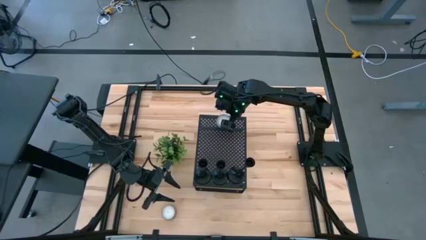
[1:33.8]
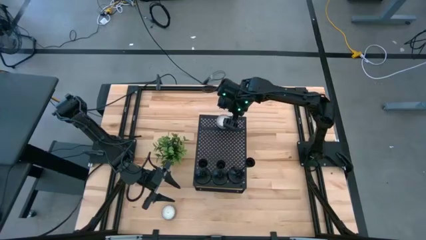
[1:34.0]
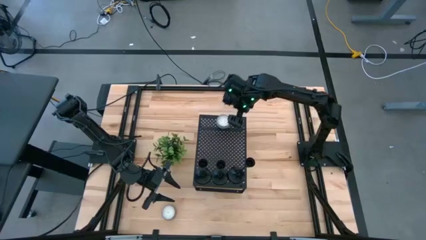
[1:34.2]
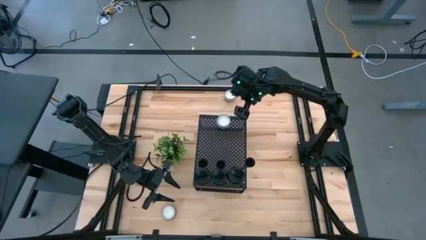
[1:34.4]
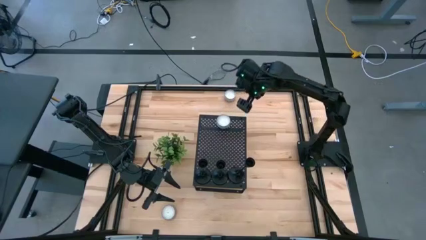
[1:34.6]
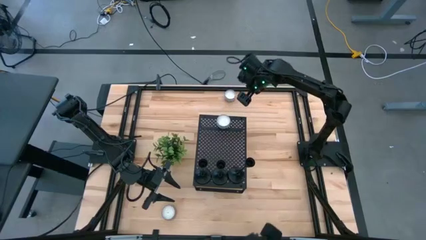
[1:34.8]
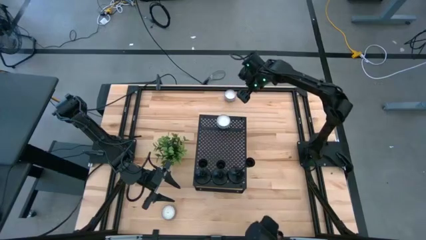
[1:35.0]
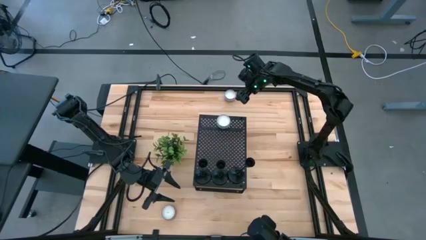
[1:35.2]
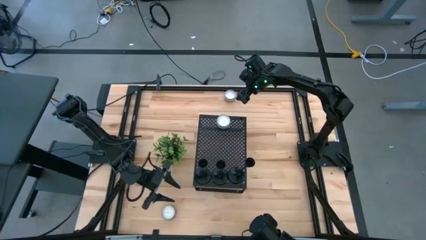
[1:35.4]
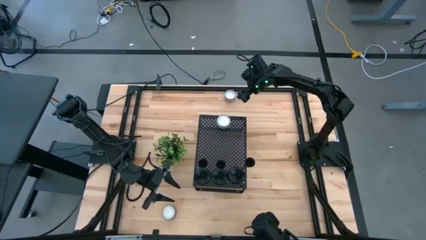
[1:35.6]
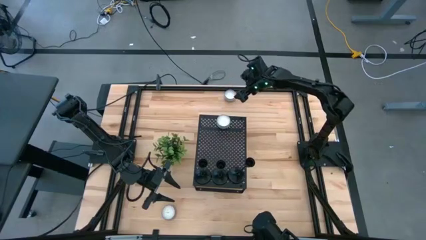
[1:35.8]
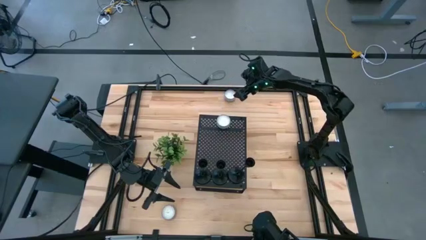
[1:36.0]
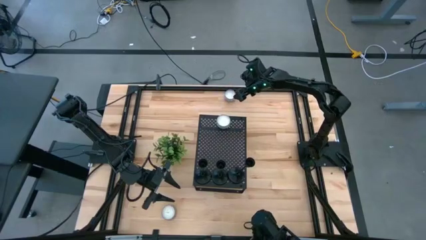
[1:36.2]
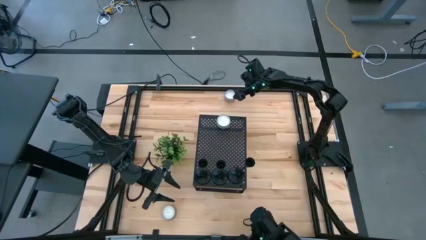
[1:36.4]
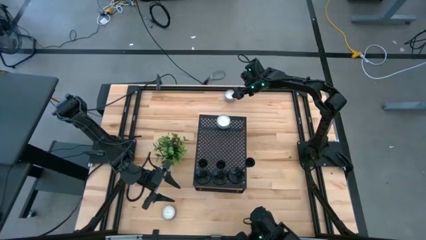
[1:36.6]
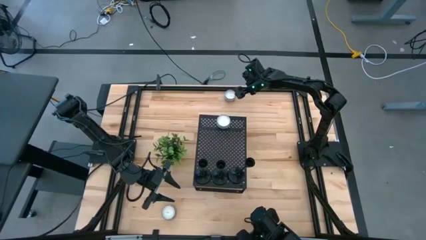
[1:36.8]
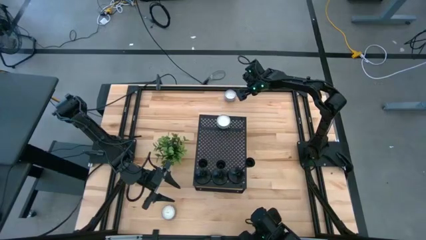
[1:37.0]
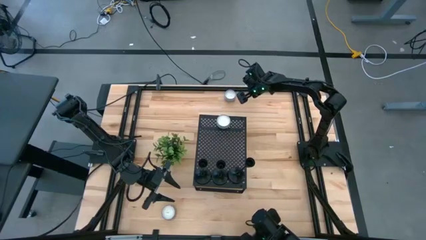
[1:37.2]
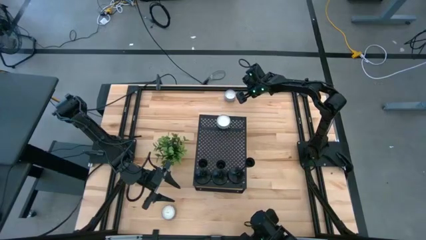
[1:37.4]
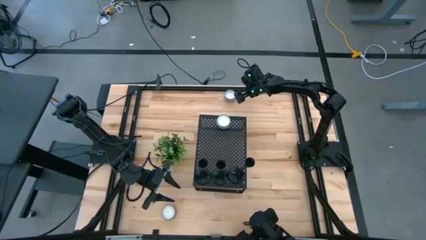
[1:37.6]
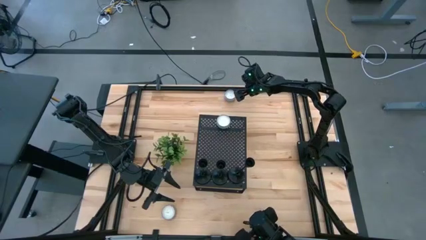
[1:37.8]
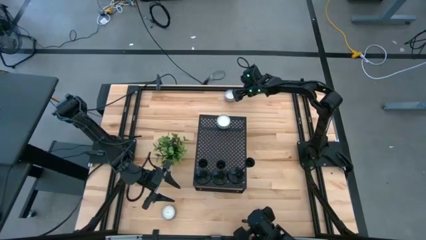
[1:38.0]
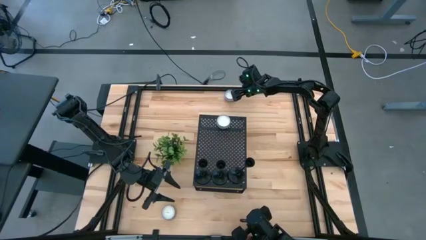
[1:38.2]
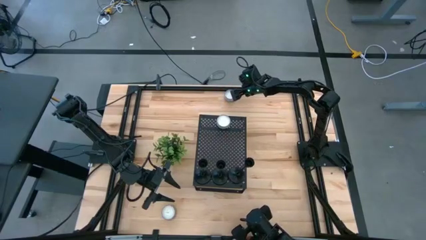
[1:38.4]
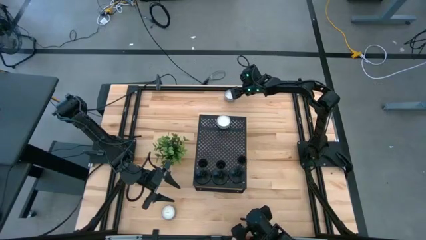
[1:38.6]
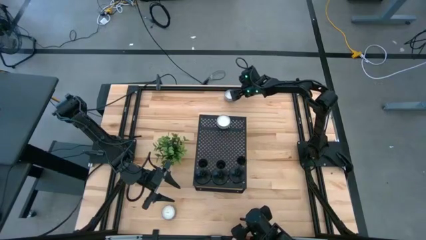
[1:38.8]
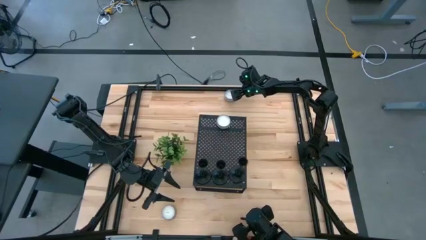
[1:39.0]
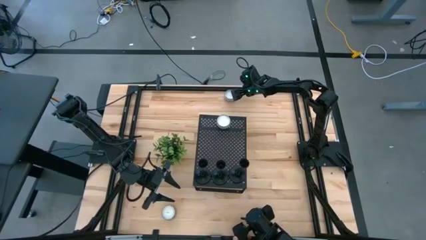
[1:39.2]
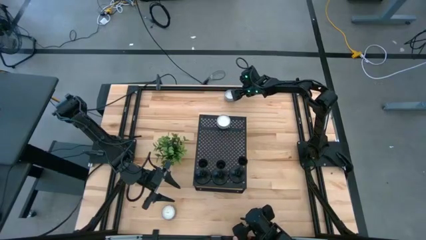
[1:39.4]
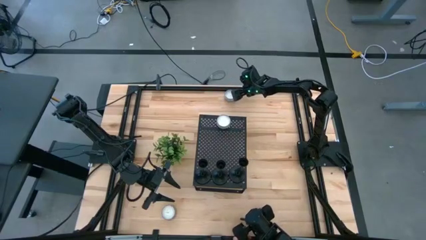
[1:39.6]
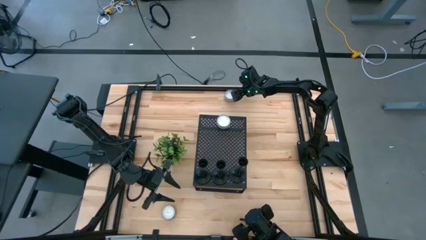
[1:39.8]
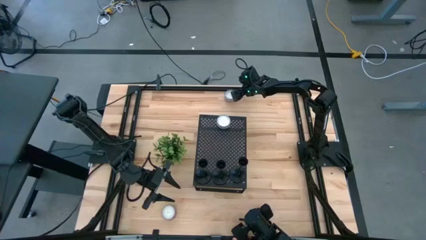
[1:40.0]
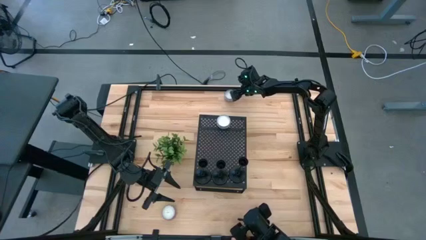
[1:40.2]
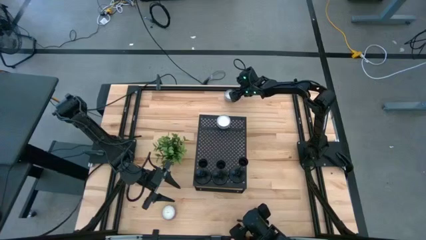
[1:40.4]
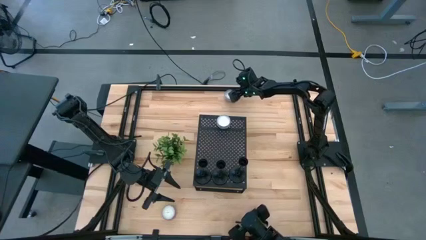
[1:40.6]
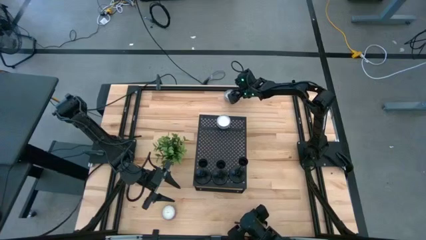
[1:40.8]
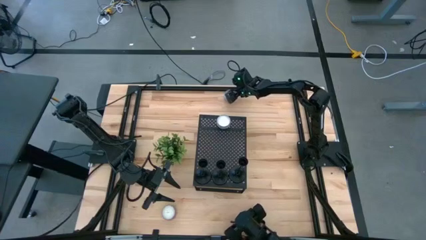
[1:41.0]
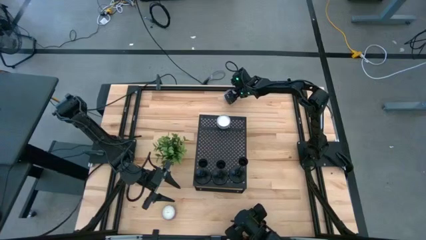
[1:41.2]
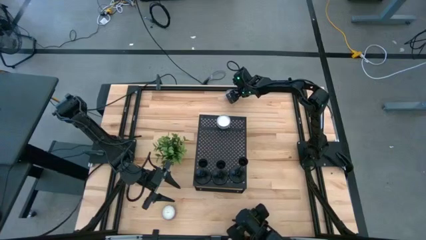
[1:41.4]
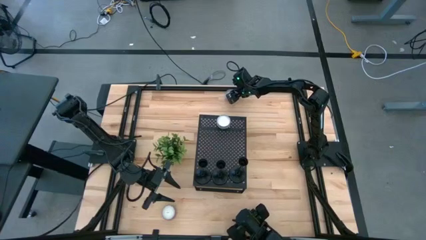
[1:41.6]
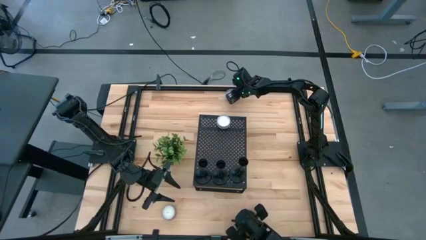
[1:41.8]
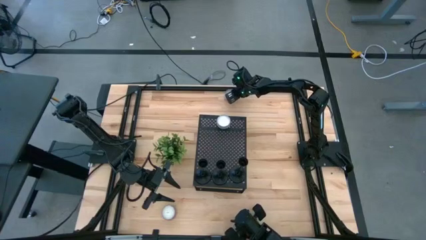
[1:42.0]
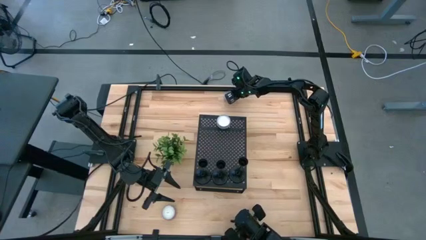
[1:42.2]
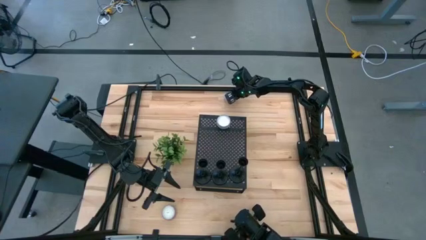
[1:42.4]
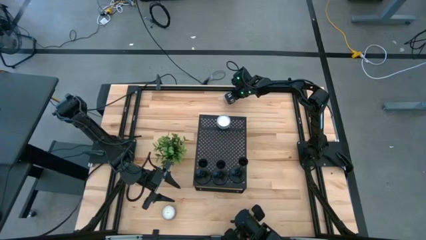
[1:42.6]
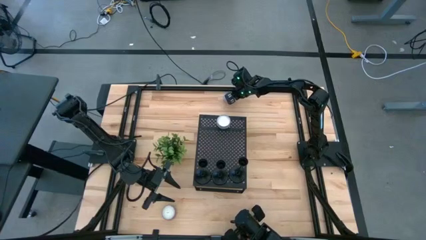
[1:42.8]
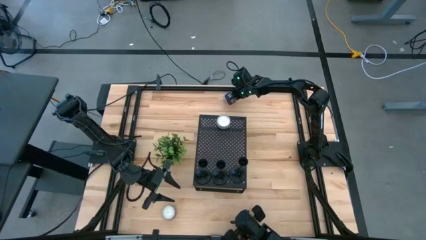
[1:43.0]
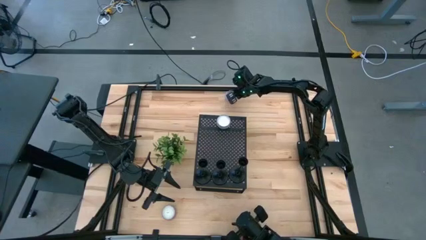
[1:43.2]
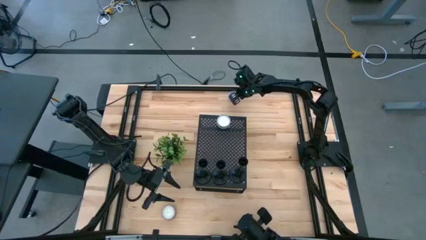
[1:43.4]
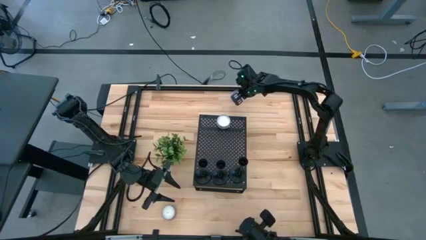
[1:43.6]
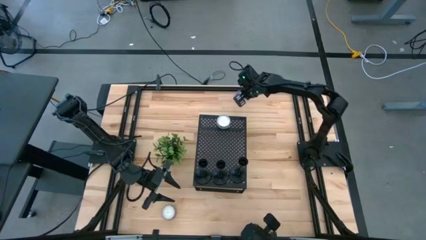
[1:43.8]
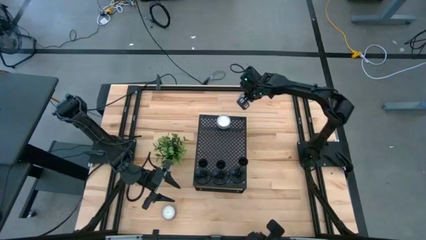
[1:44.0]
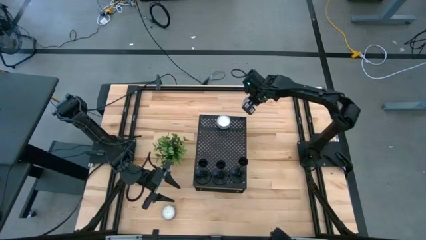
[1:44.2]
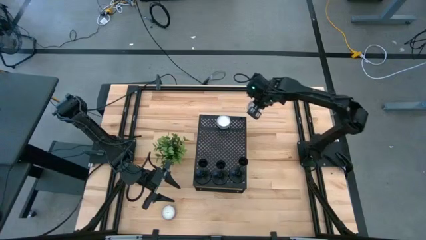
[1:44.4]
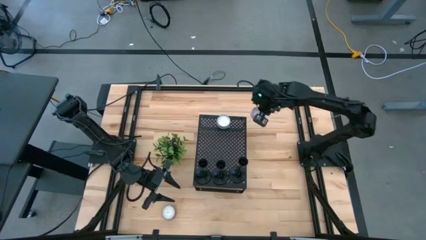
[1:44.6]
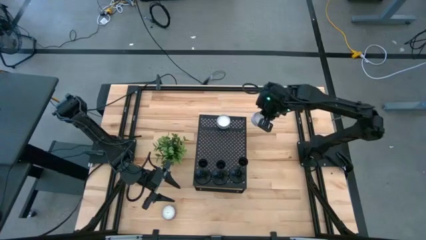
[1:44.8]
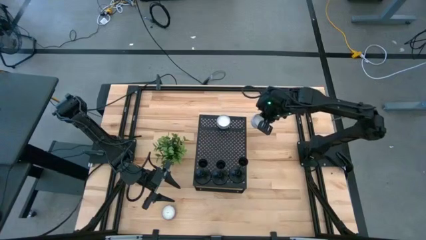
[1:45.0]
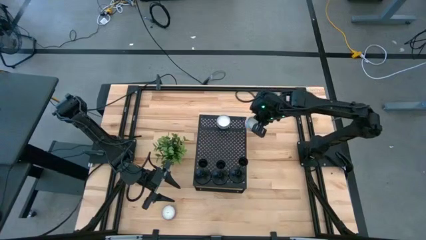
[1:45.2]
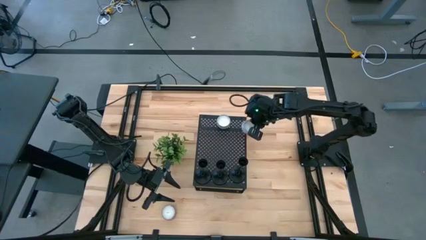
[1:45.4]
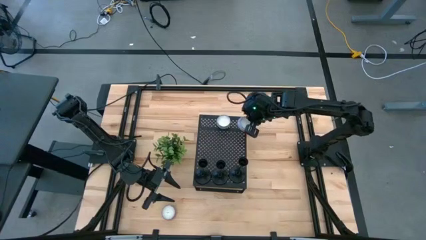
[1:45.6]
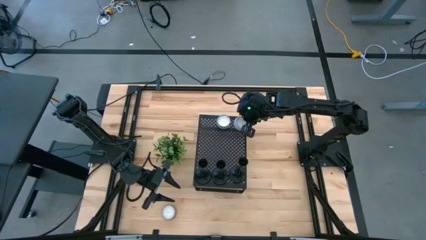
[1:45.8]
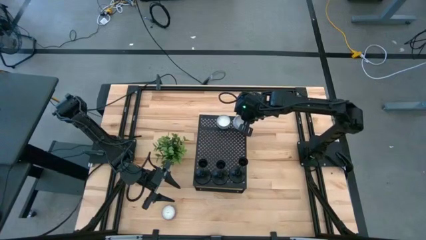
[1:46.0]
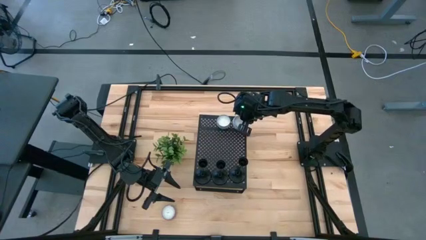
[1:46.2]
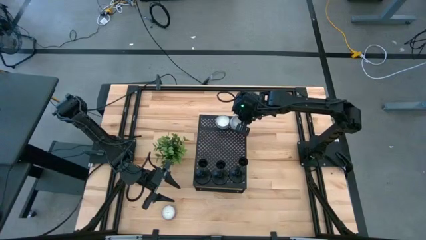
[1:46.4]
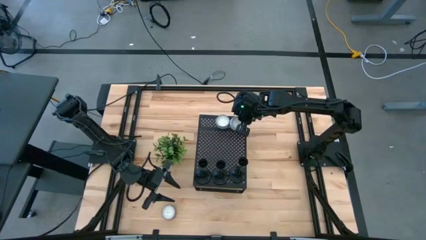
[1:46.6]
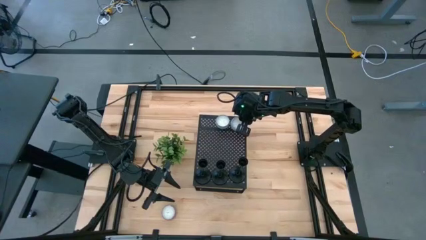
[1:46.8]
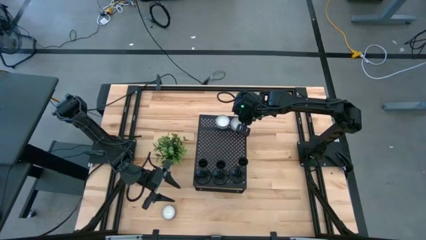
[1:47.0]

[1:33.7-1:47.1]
Task: Pick & Place candle stick holders
Put the red patterned candle on the shelf

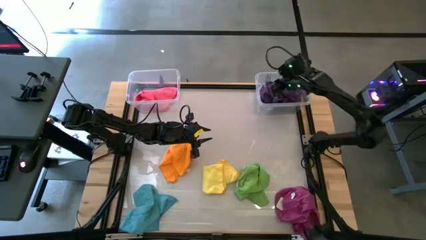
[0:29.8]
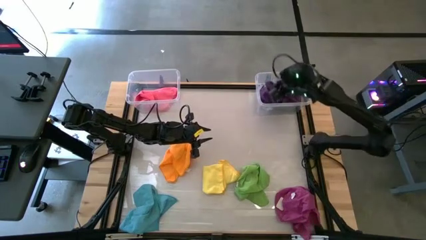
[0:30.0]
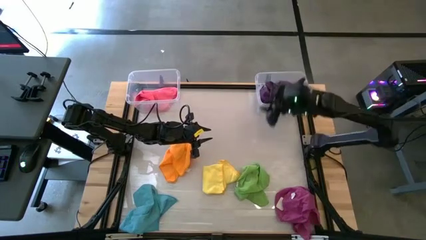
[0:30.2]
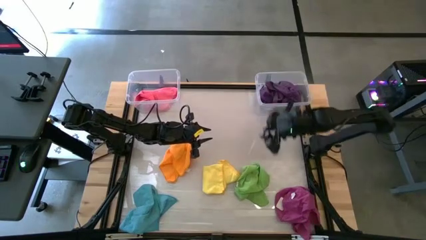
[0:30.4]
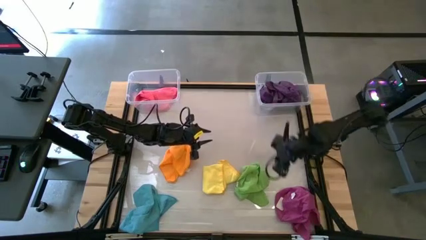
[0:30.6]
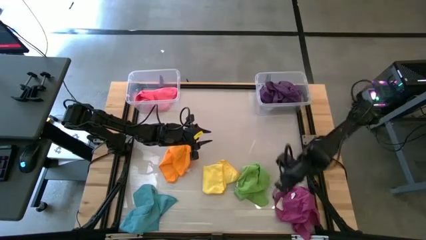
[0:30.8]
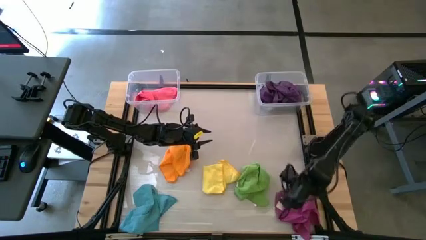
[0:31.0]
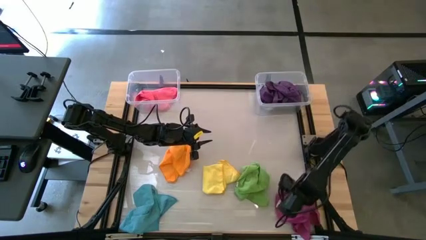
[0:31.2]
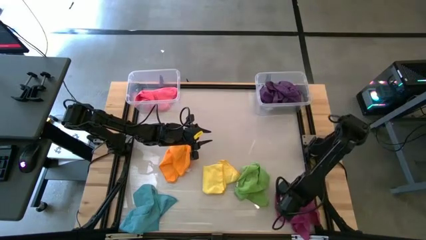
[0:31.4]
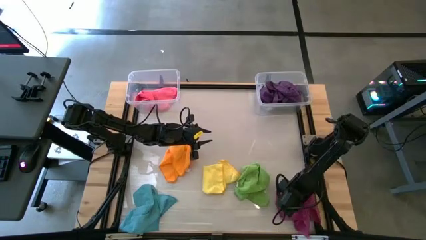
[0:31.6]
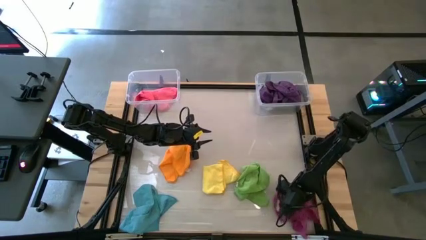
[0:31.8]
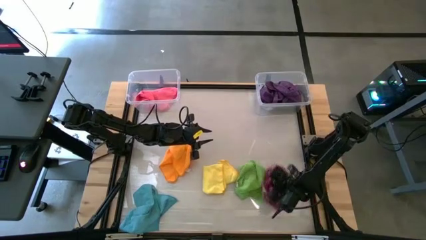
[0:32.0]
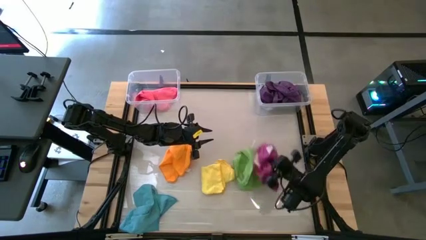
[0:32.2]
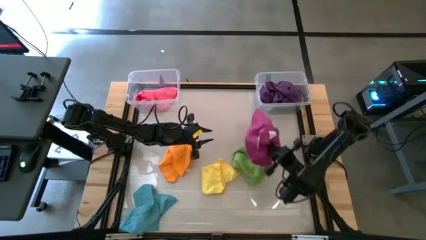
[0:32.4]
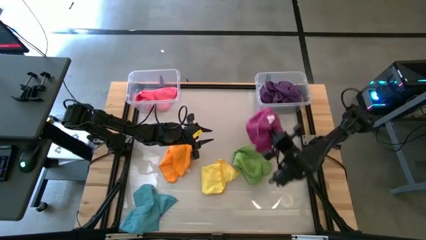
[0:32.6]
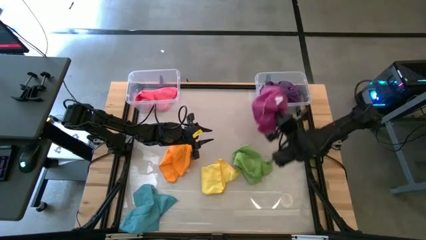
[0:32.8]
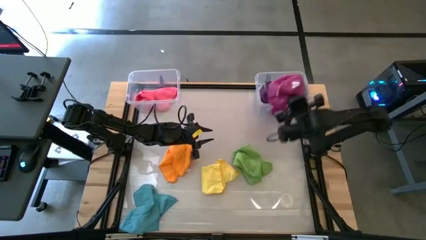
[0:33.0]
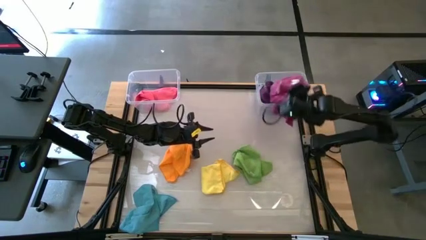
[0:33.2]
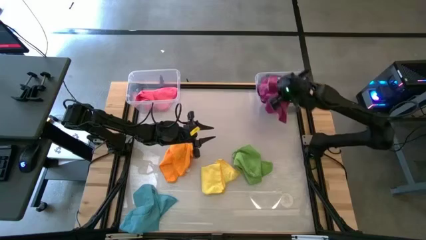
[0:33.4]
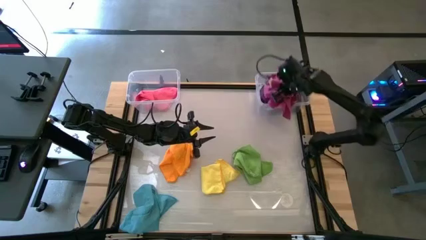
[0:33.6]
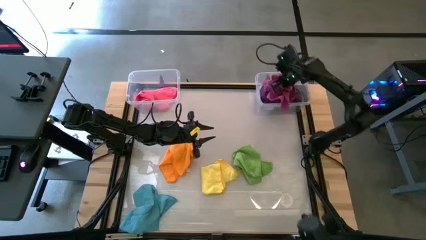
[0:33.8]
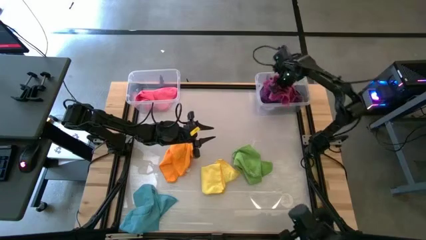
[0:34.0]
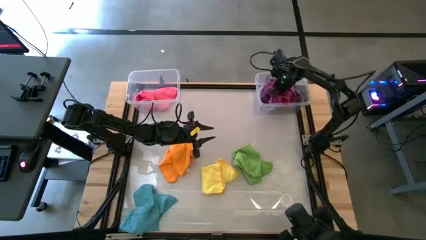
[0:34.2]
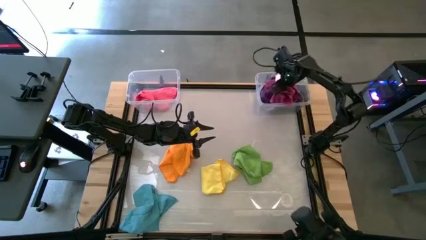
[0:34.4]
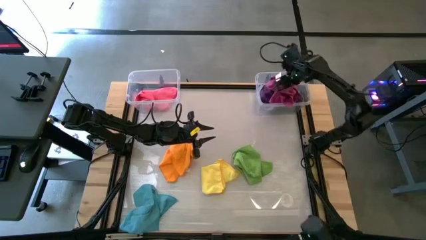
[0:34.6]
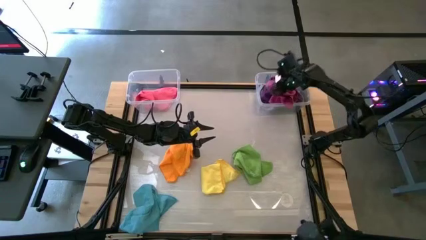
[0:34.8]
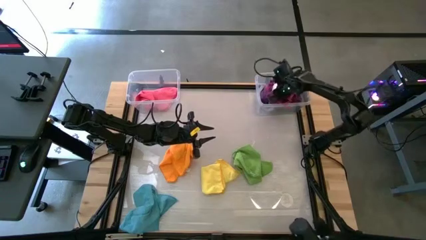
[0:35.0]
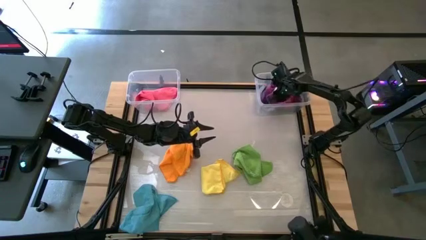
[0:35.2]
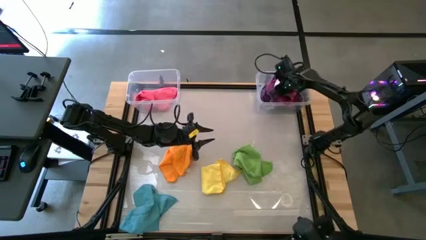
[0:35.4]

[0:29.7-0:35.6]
Task: Sort towels by color in basket
Put the purple kitchen towel into the right transparent bin
